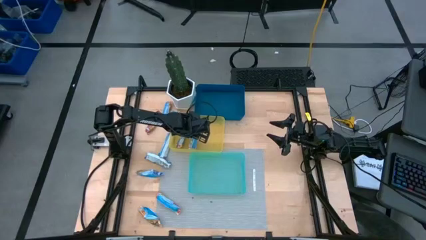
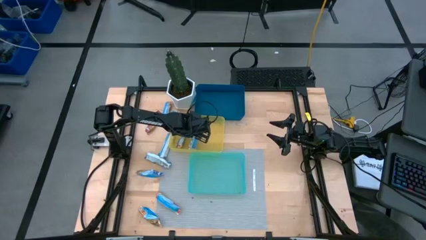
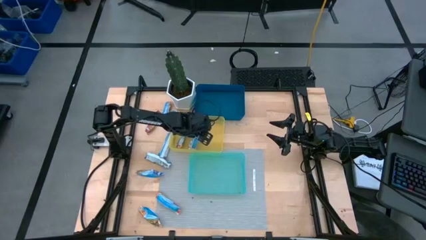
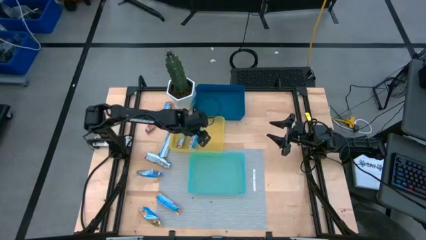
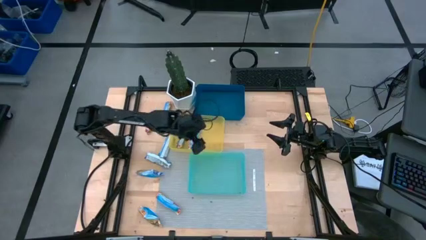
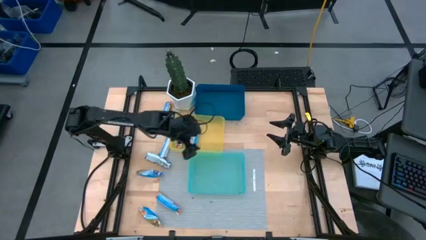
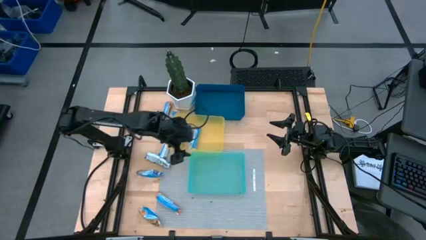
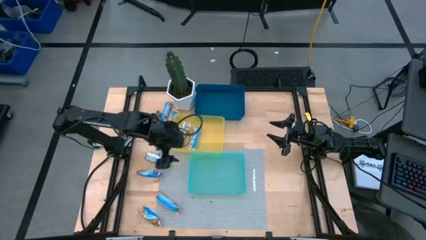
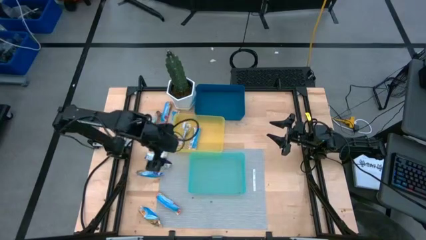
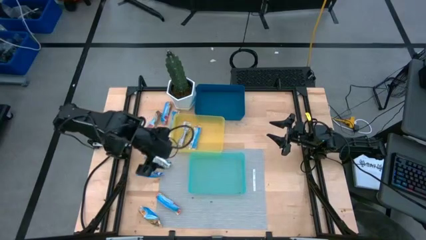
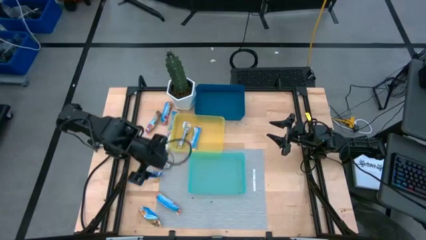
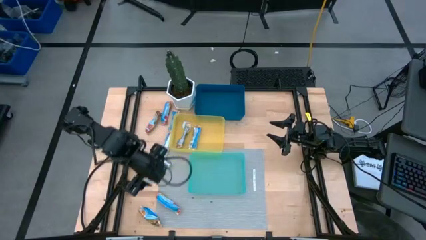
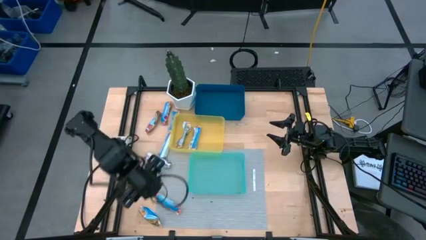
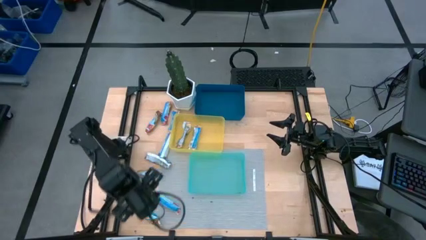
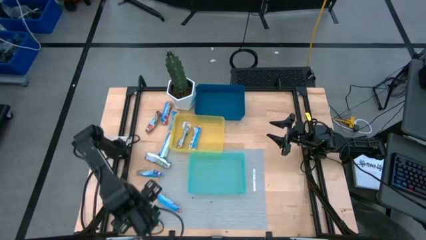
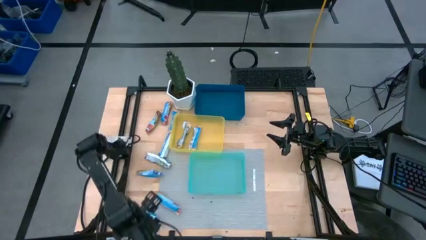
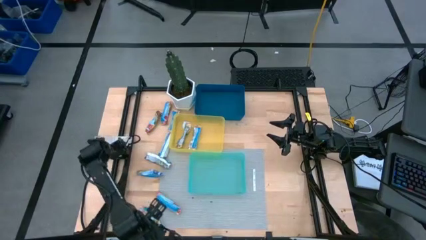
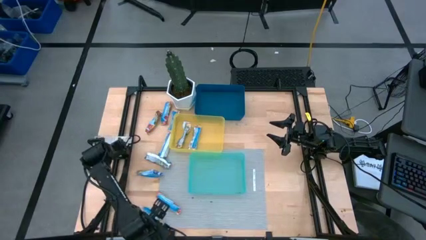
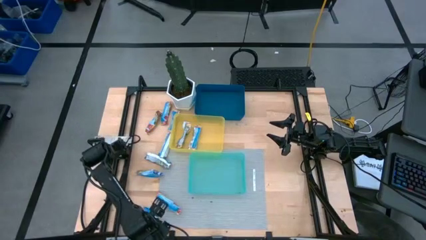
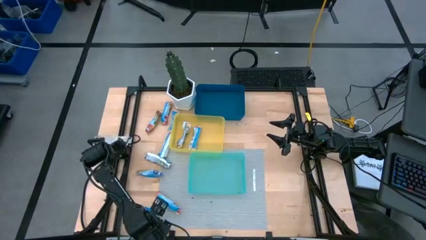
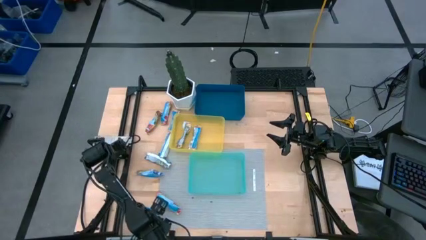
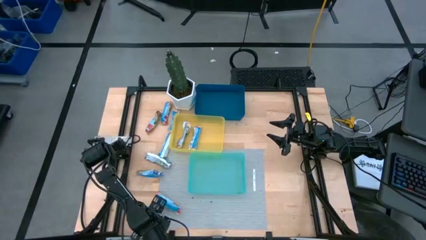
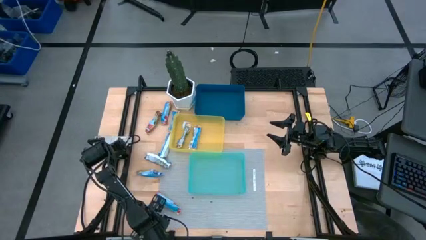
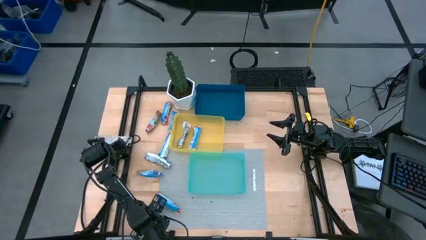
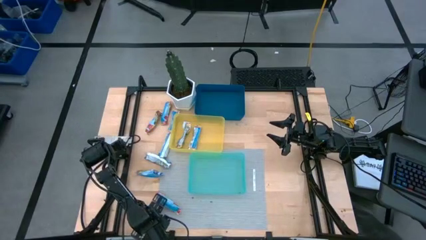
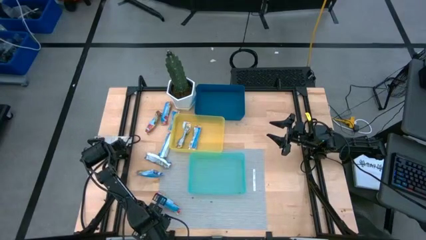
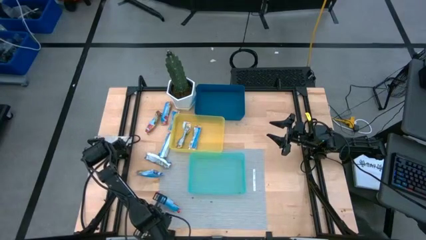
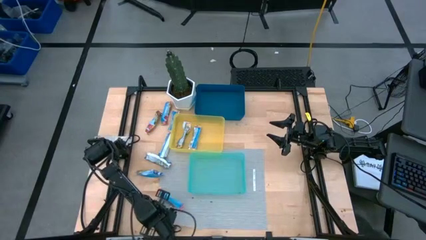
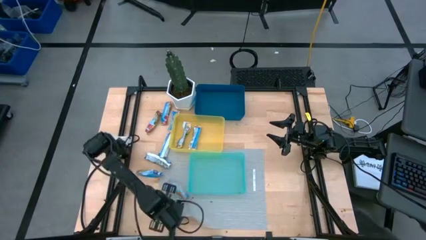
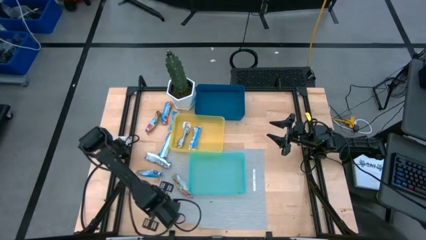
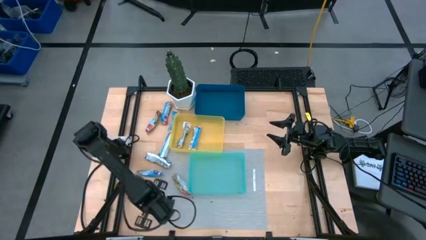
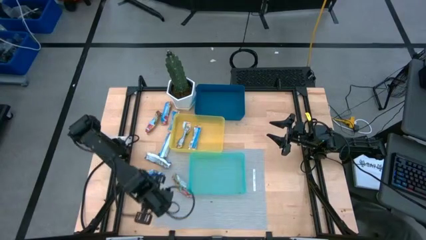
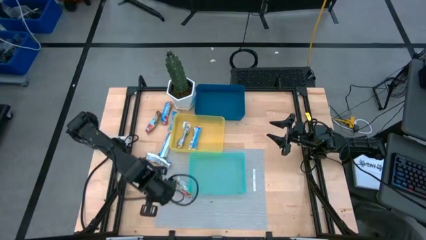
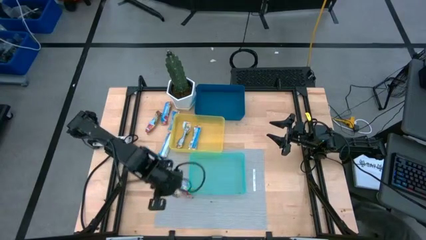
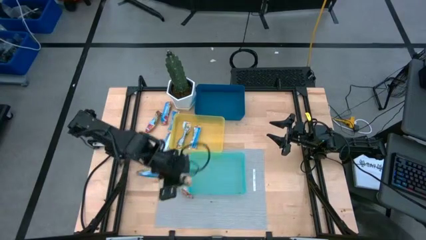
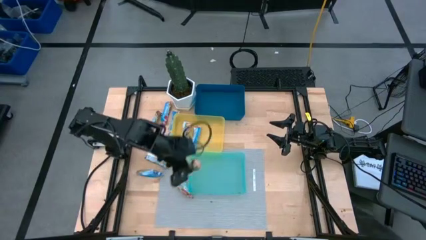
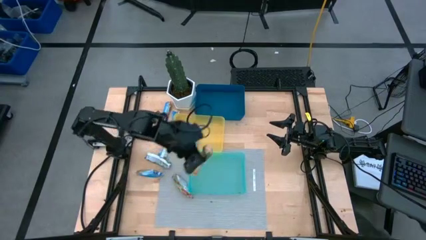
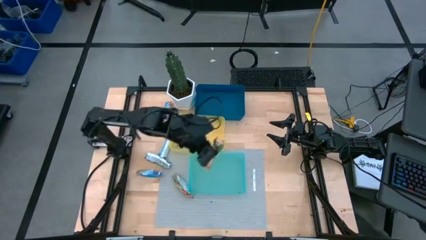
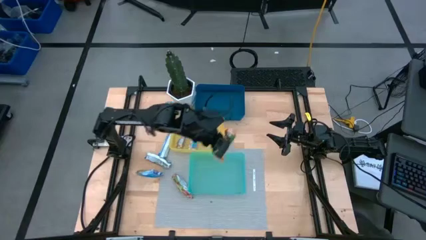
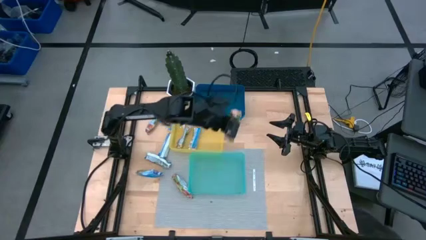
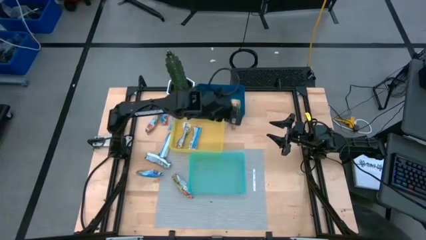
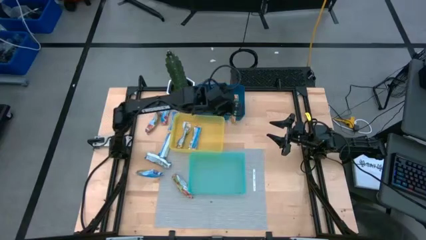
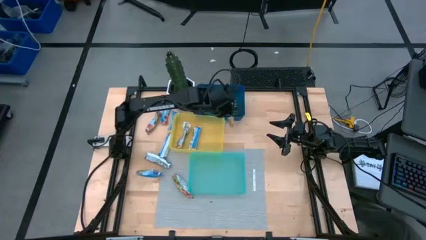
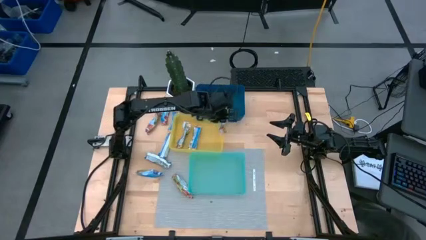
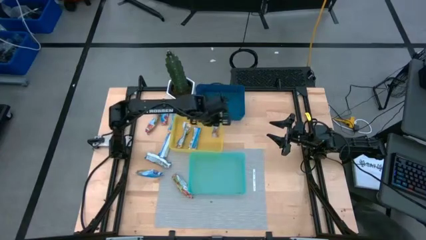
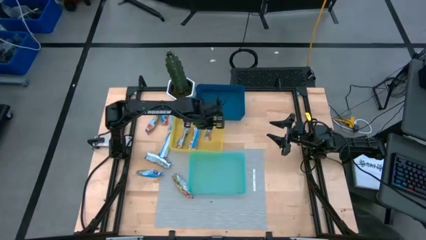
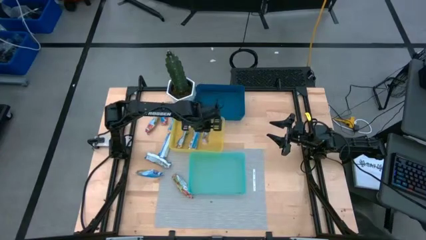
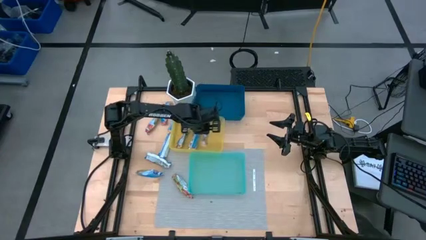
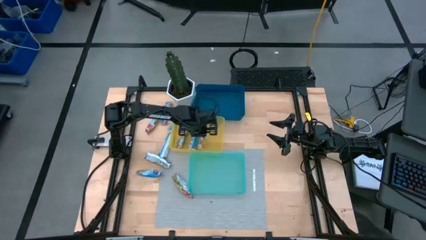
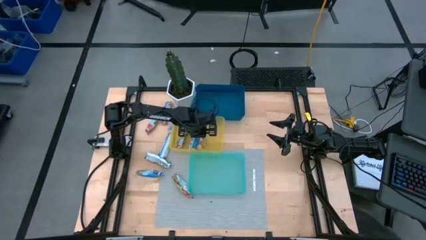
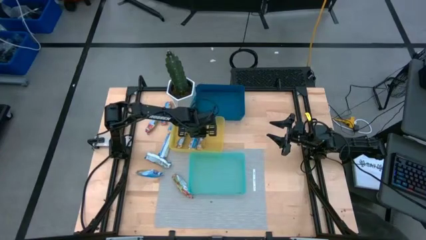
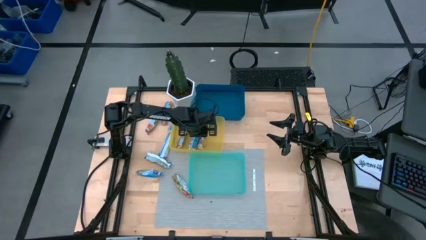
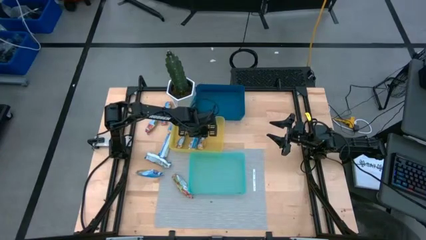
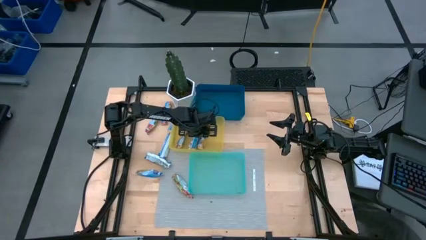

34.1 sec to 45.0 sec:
Task: Pick and place Granola Bars by type
Put the yellow granola bar into the yellow bin
